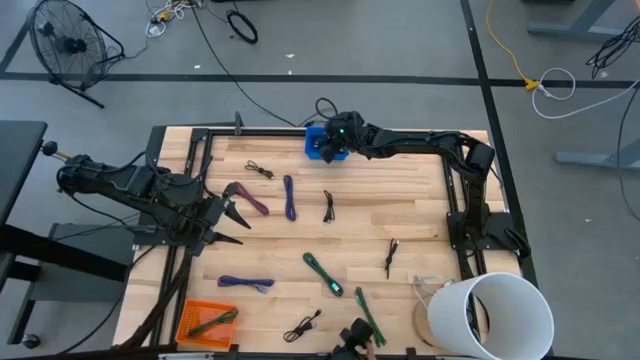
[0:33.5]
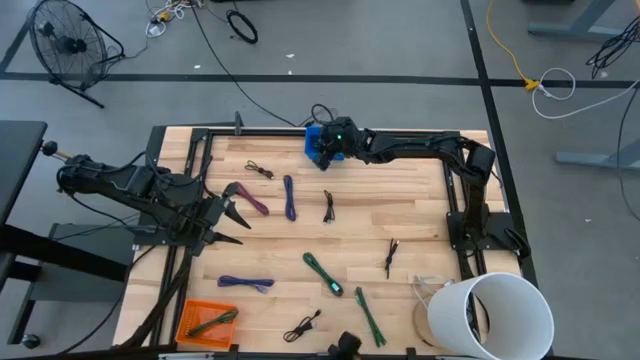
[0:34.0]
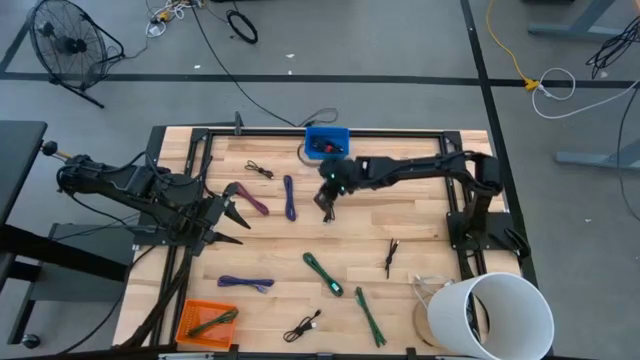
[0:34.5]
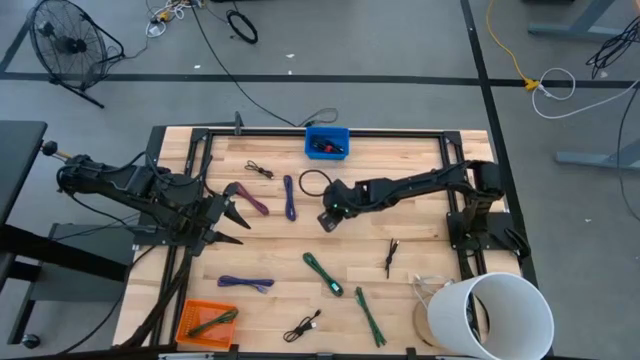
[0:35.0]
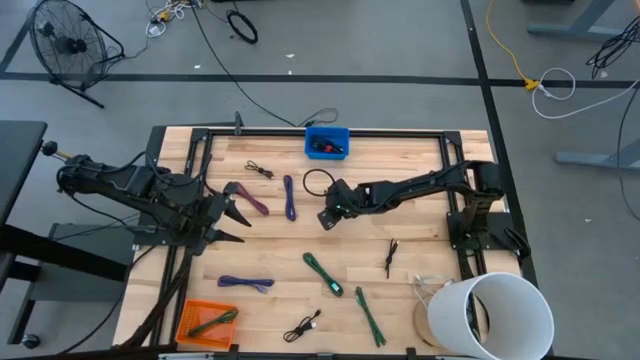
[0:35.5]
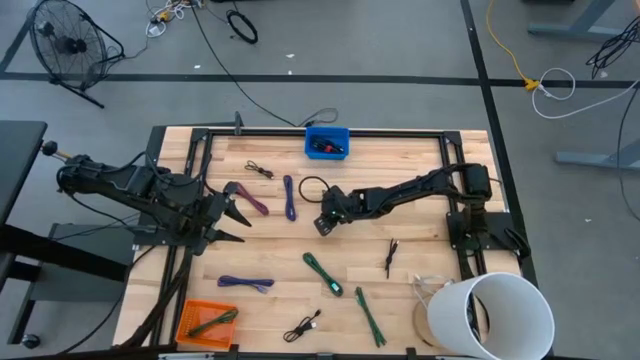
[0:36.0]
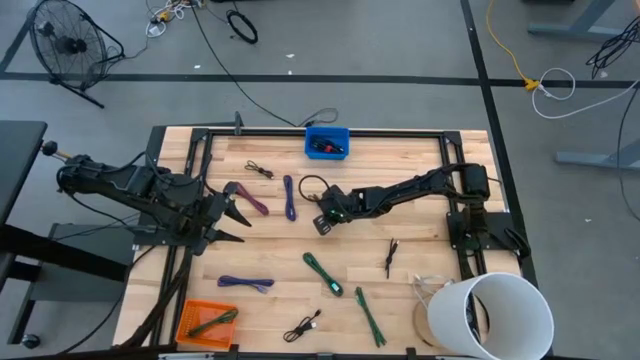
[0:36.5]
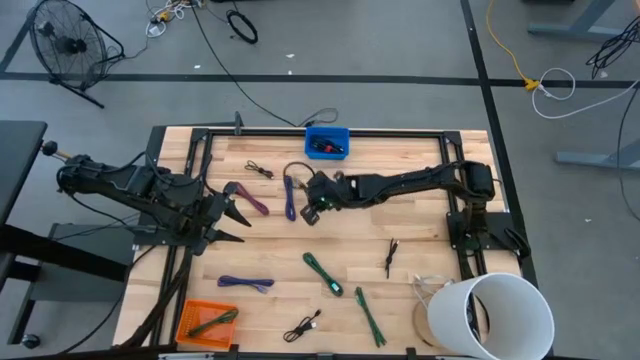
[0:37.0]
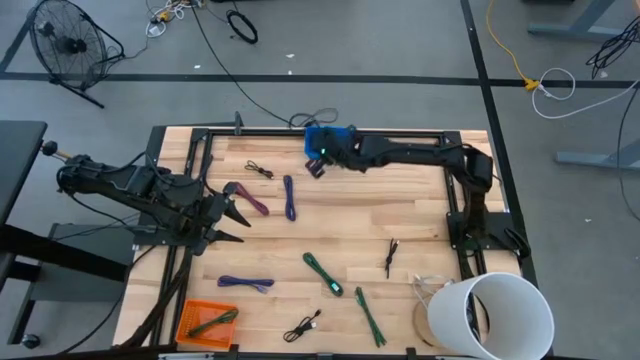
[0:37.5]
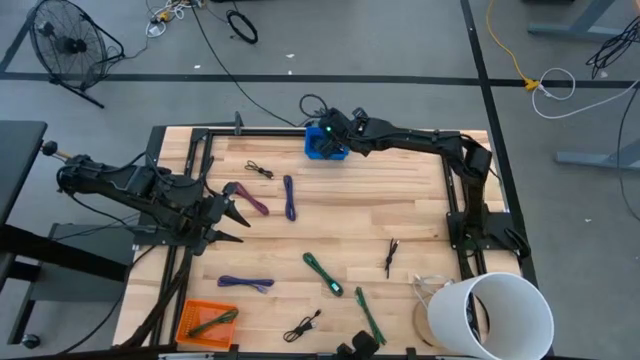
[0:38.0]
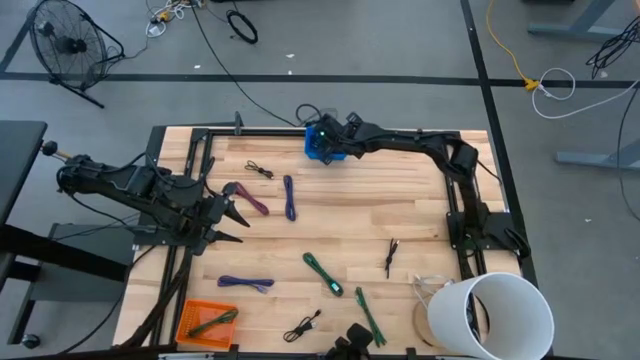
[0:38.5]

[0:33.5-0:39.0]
Task: Pick & Place USB Port
Put the black charger cable into the blue bin

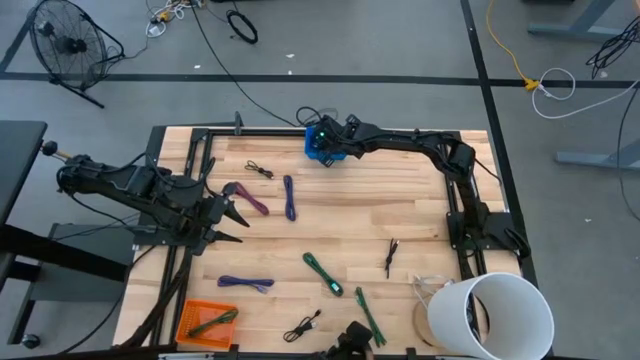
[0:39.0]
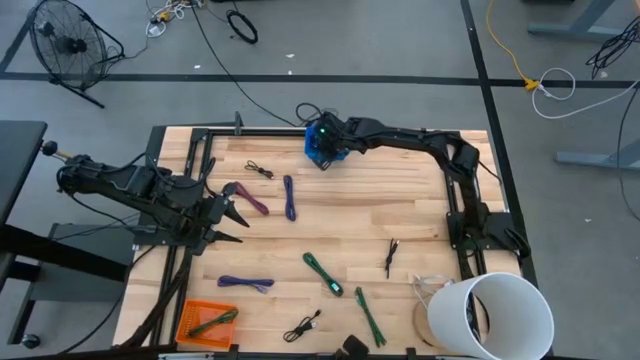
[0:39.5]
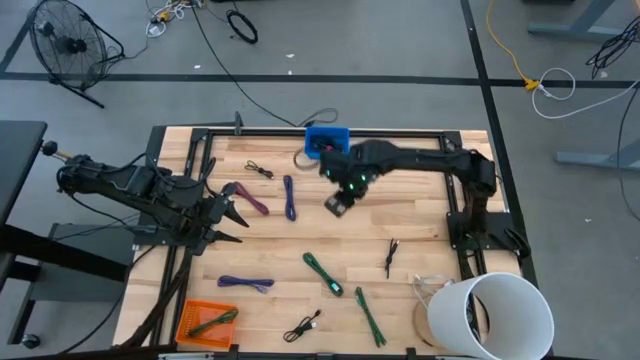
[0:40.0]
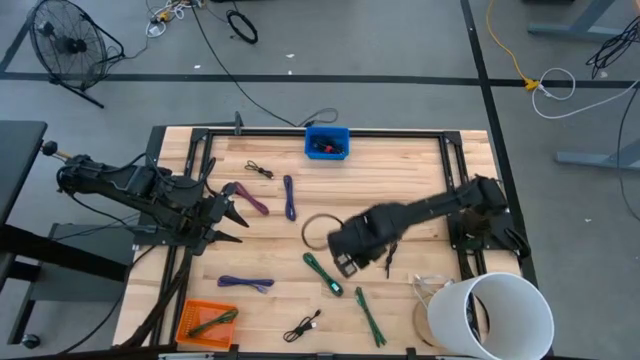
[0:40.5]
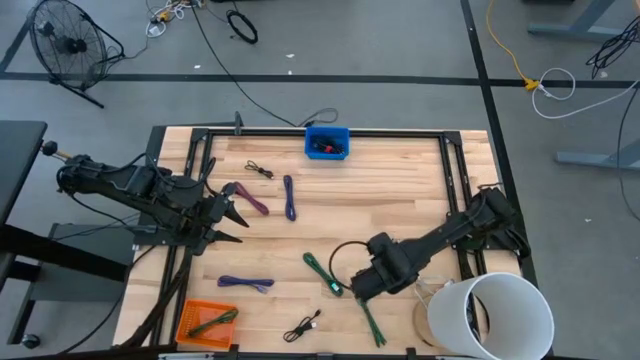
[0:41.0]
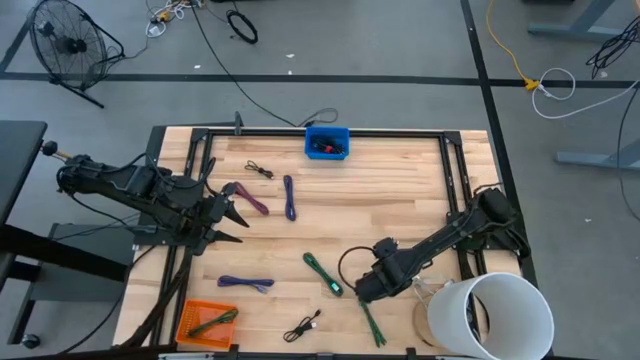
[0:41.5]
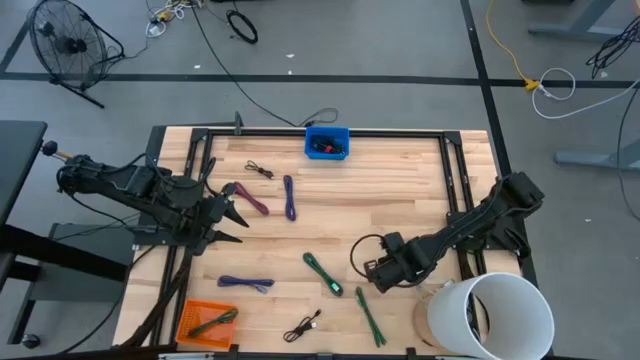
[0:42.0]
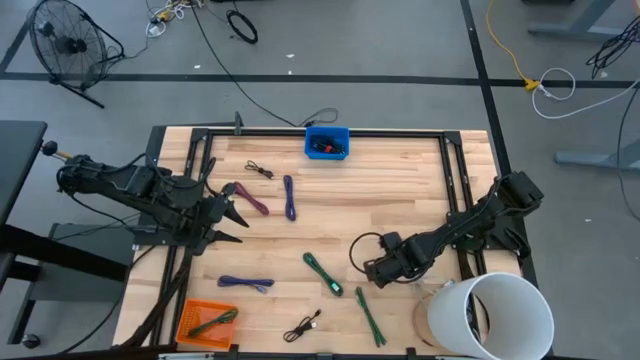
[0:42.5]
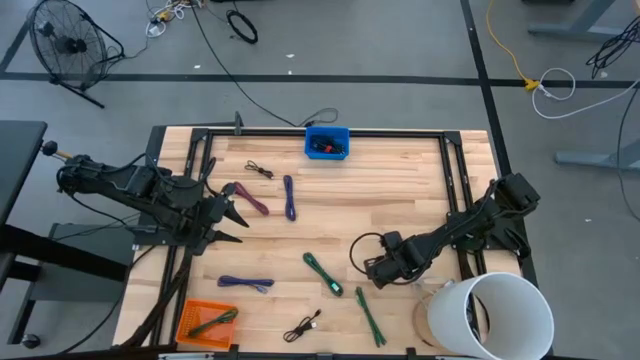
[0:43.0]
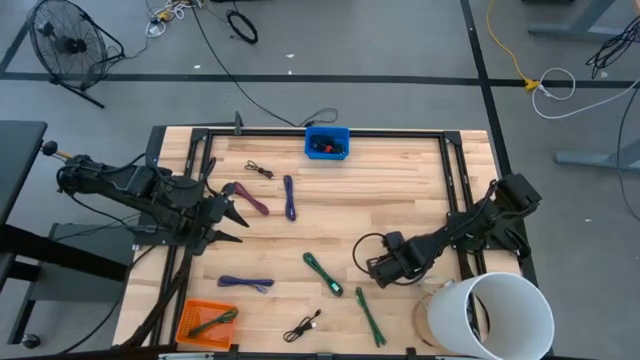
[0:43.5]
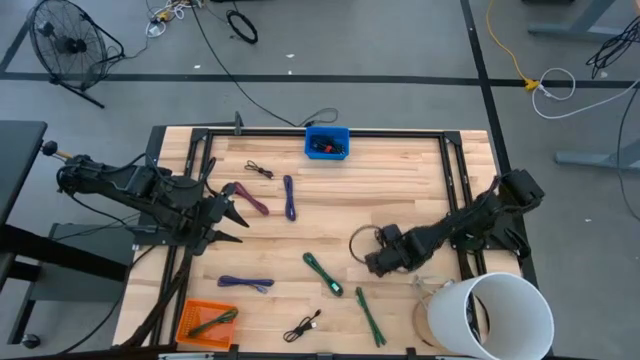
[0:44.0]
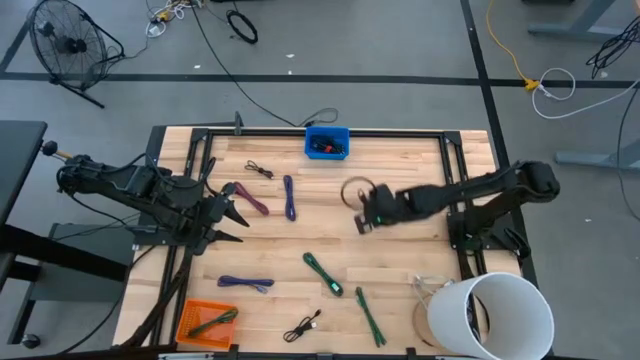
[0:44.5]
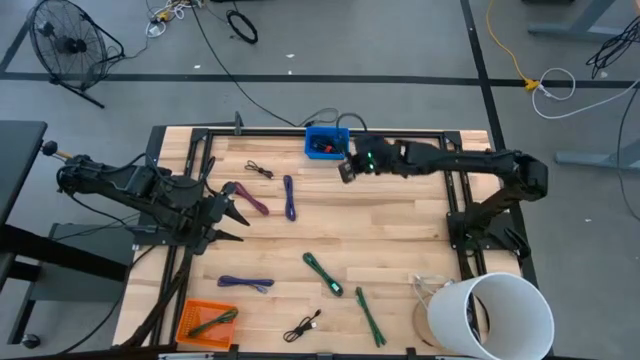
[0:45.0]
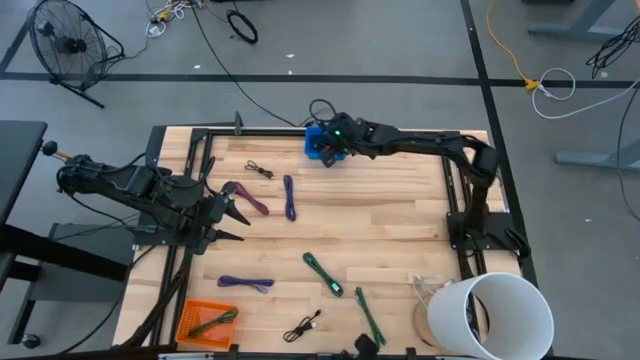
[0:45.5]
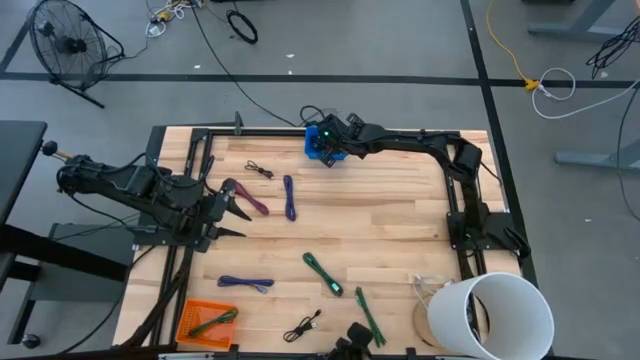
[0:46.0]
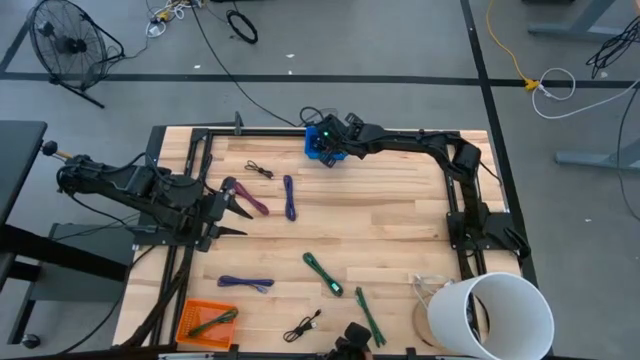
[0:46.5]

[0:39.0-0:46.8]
Put the black charger cable into the blue bin

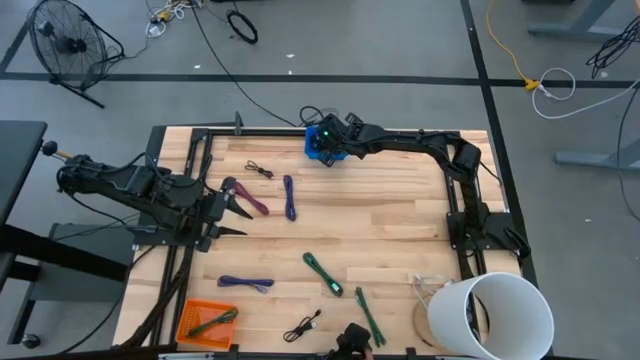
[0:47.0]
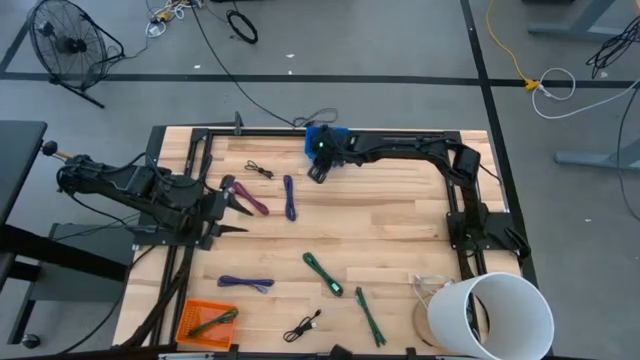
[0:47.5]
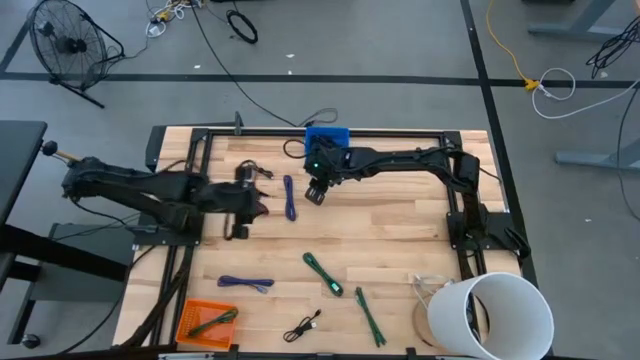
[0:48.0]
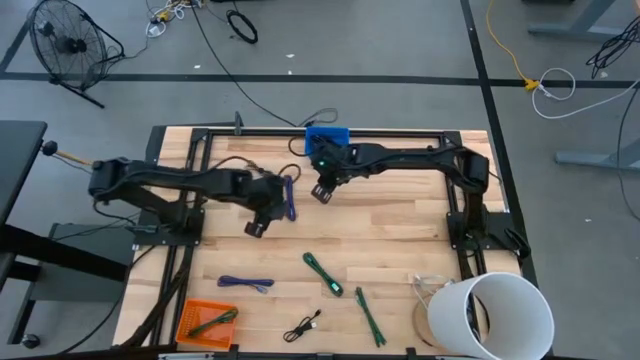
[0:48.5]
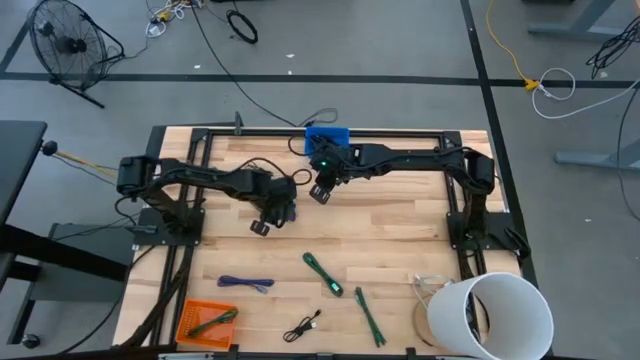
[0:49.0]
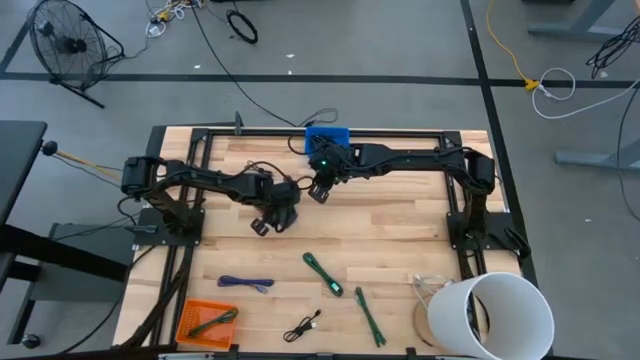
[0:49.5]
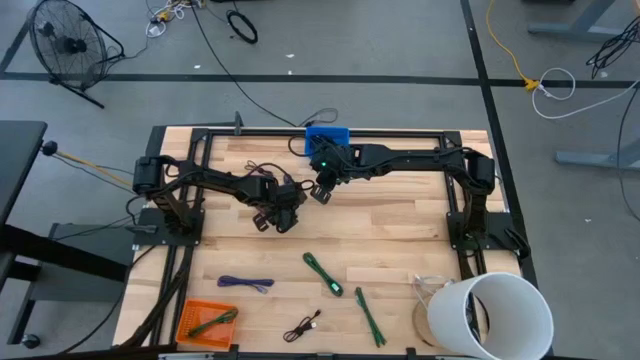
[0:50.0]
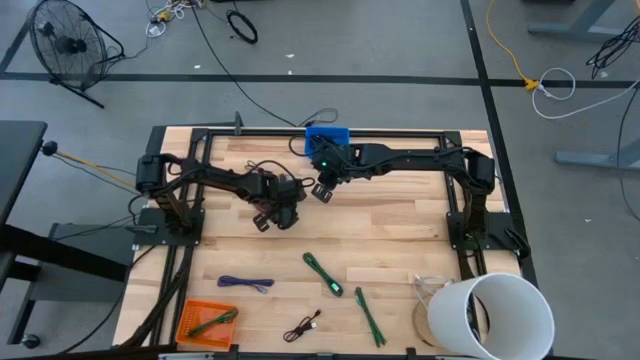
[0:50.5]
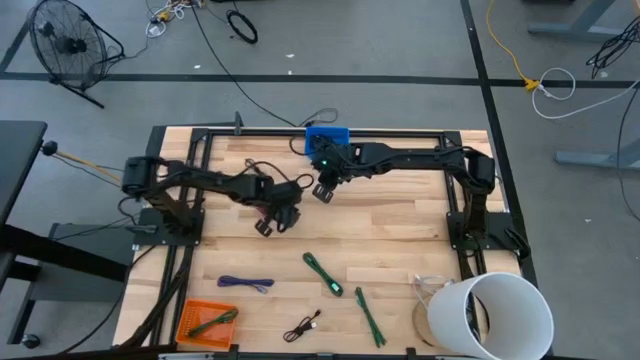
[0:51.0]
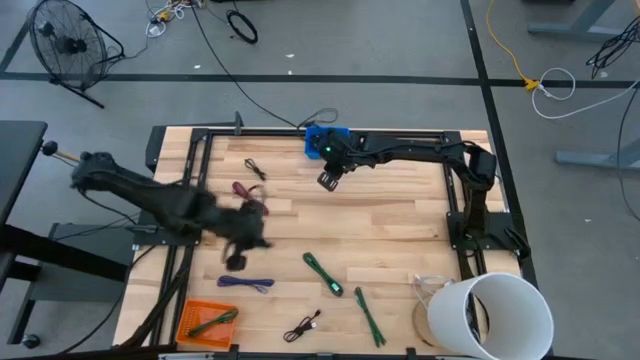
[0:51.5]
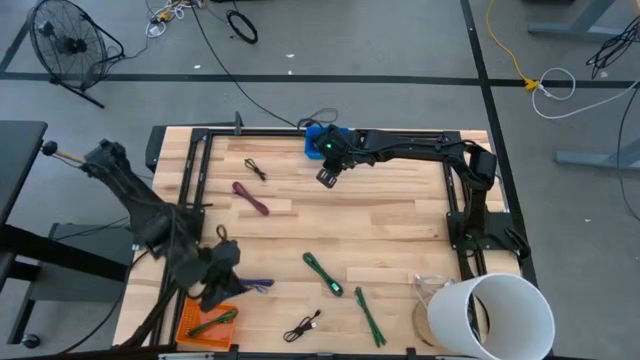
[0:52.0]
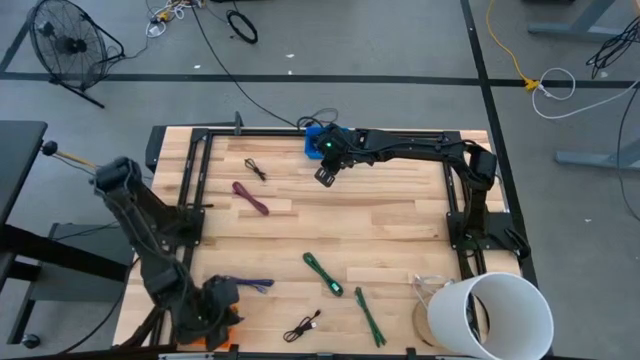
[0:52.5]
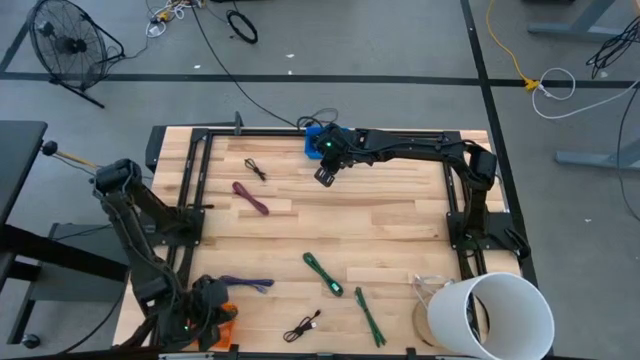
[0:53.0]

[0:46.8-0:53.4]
Put the purple black charger cable into the orange bin

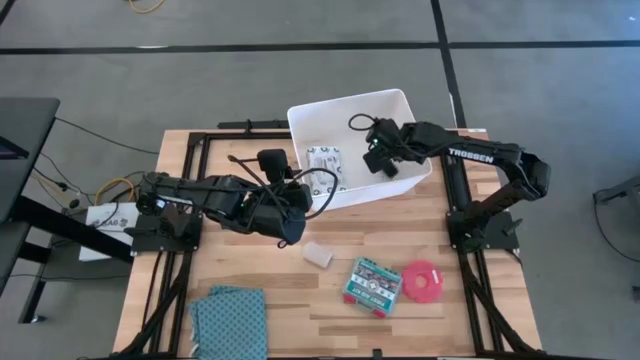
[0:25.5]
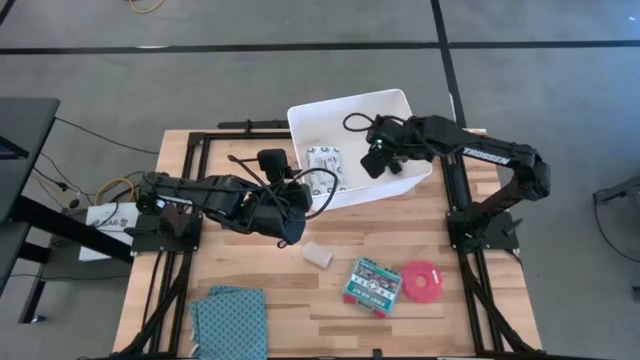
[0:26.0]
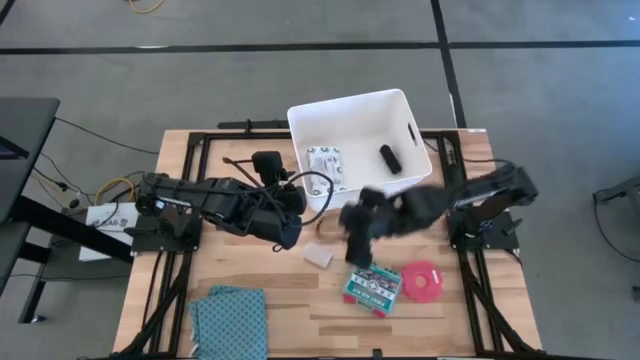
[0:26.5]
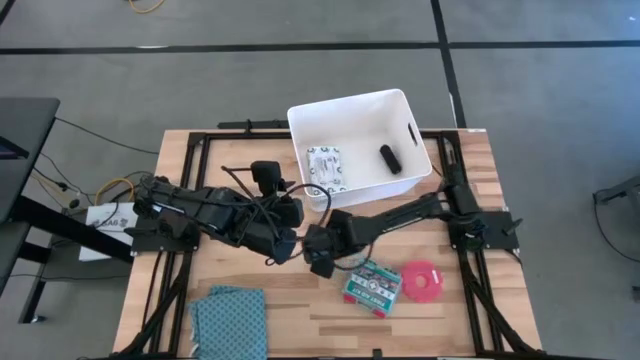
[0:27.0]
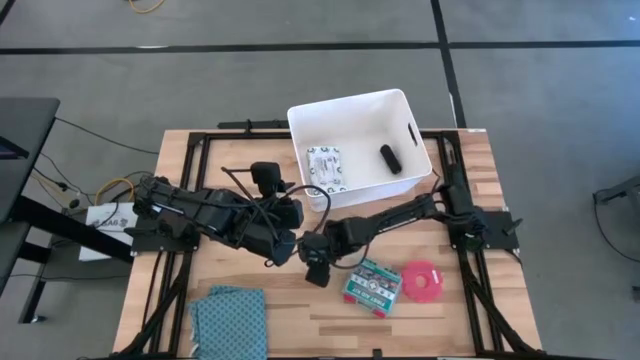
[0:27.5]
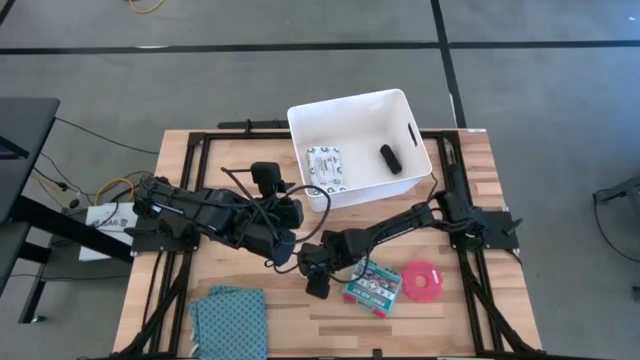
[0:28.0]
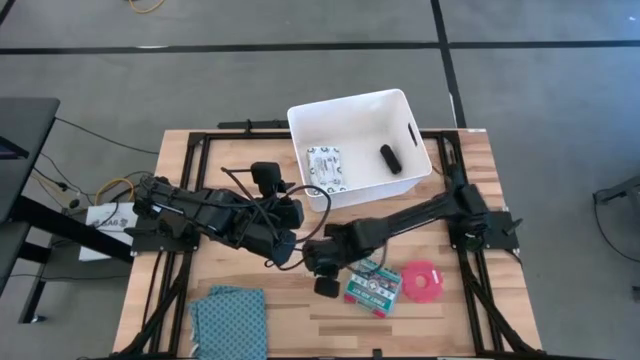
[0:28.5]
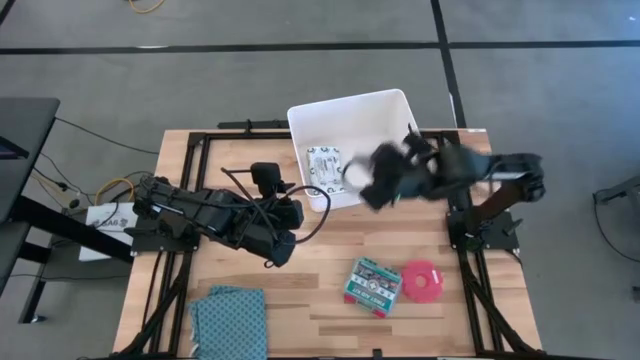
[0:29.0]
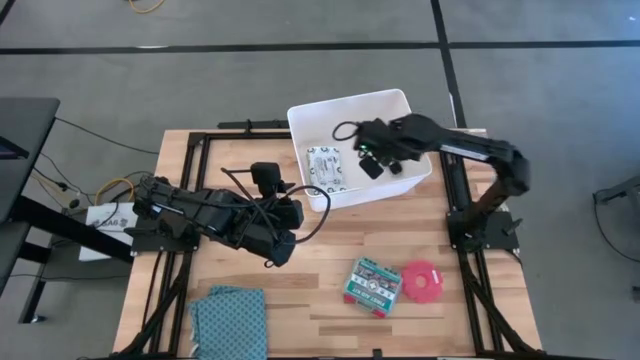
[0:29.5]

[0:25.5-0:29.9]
Task: Pick & place medical supplies in basket/bin
Put the white bandage into the white bin
